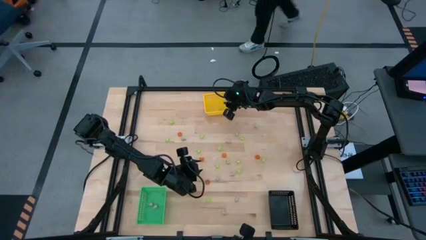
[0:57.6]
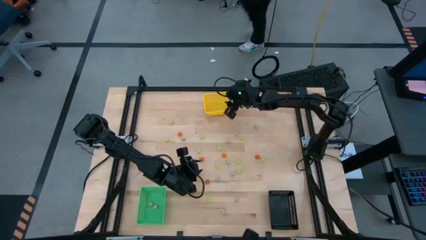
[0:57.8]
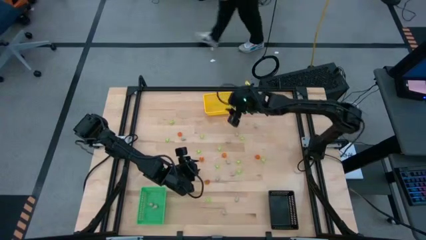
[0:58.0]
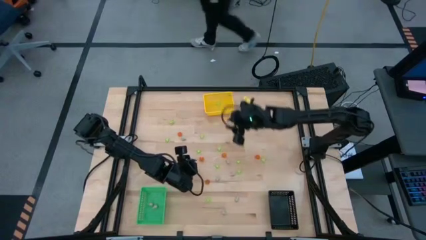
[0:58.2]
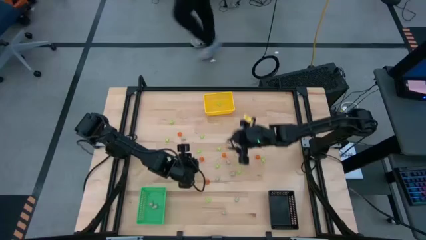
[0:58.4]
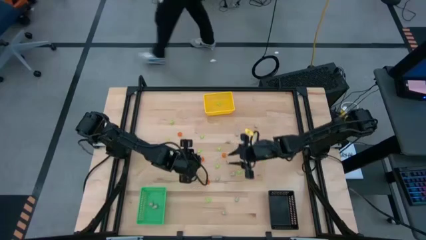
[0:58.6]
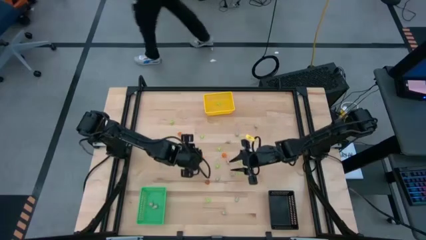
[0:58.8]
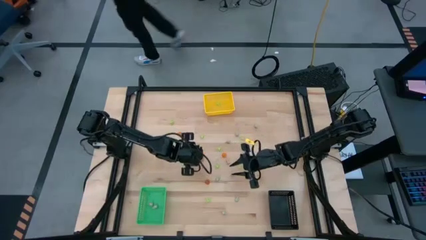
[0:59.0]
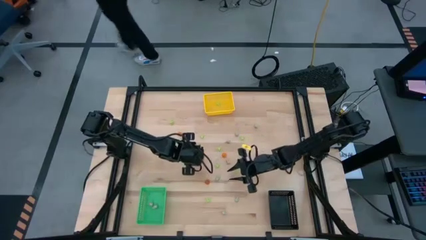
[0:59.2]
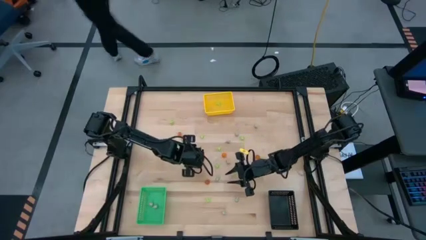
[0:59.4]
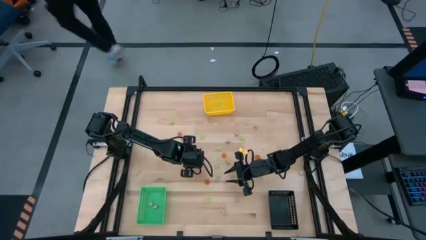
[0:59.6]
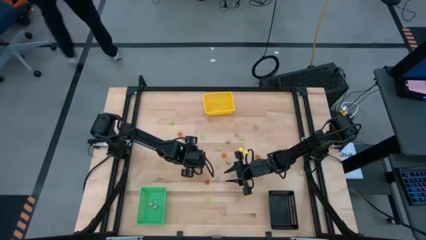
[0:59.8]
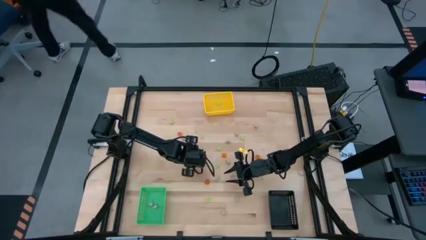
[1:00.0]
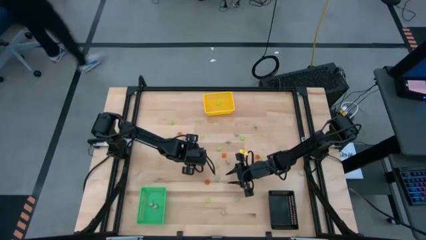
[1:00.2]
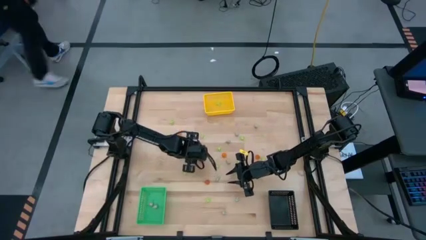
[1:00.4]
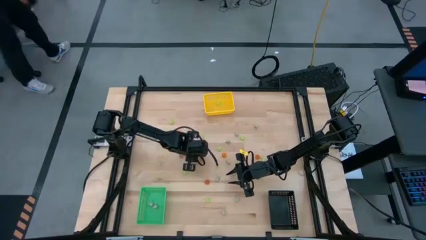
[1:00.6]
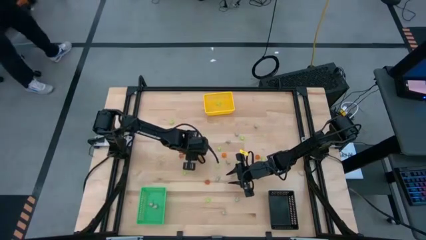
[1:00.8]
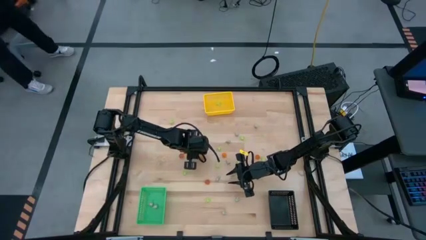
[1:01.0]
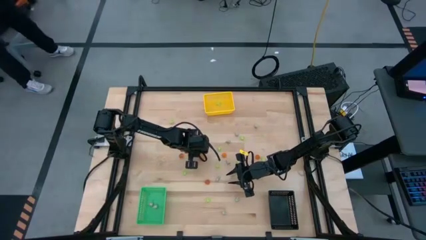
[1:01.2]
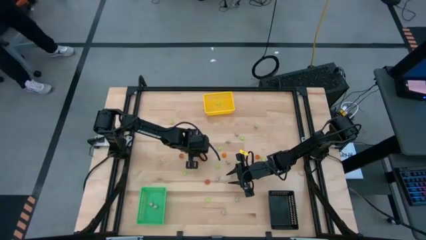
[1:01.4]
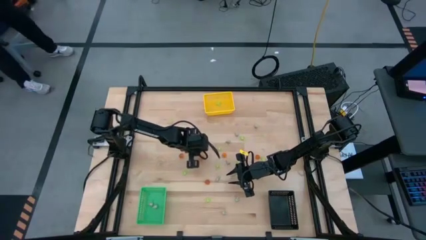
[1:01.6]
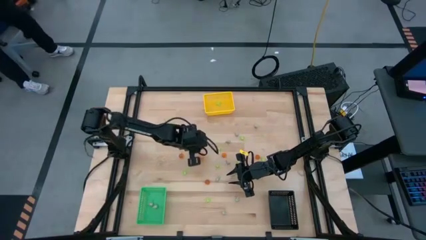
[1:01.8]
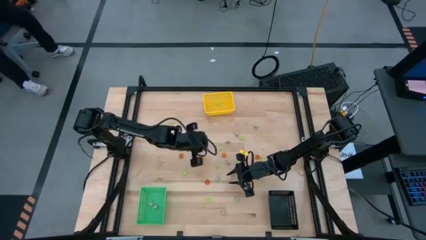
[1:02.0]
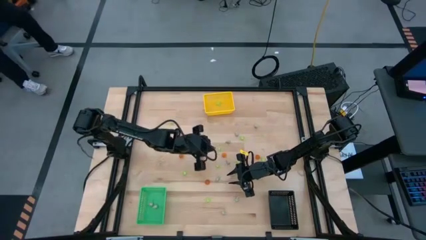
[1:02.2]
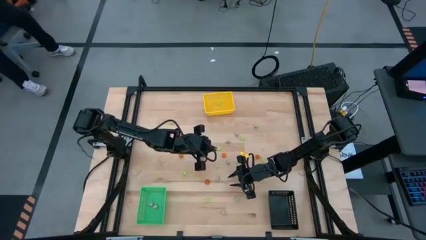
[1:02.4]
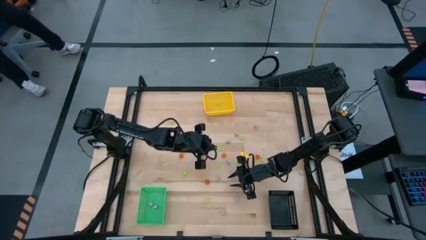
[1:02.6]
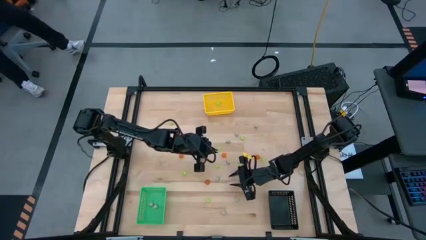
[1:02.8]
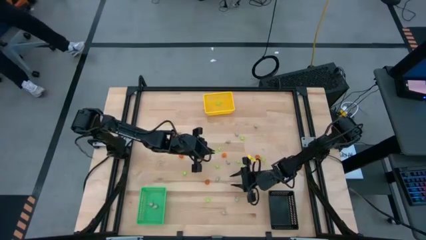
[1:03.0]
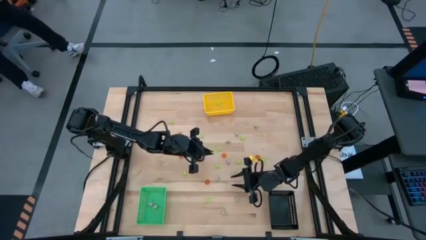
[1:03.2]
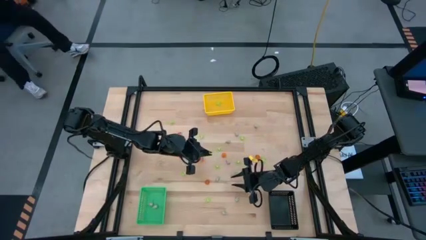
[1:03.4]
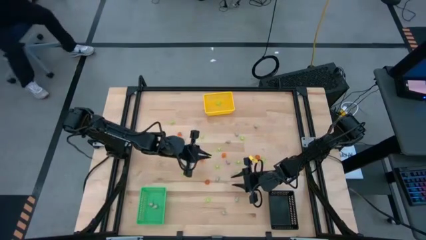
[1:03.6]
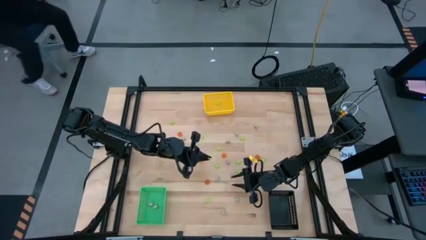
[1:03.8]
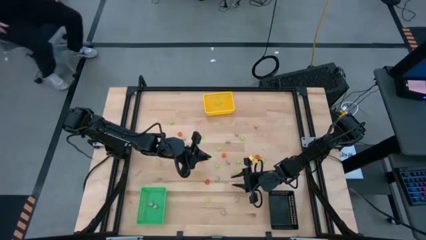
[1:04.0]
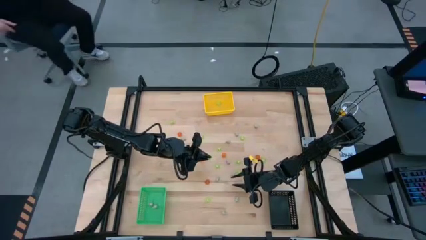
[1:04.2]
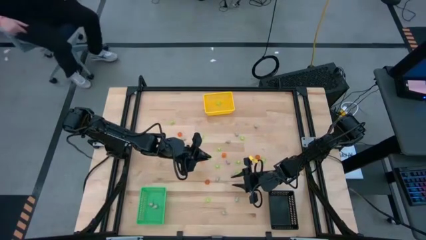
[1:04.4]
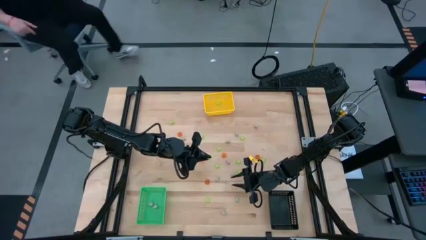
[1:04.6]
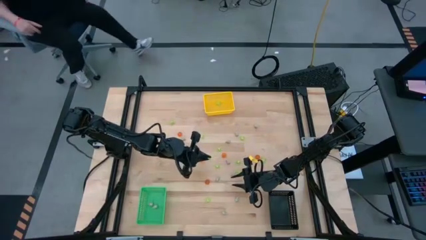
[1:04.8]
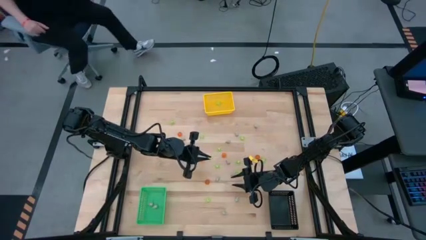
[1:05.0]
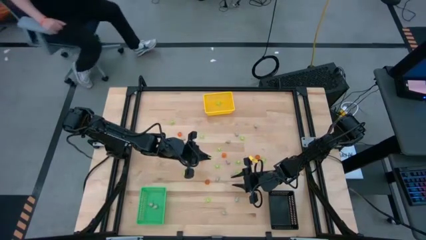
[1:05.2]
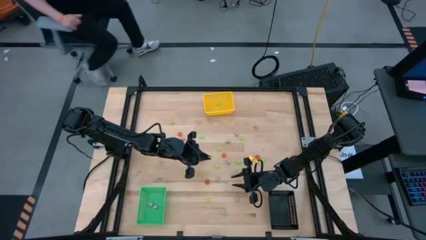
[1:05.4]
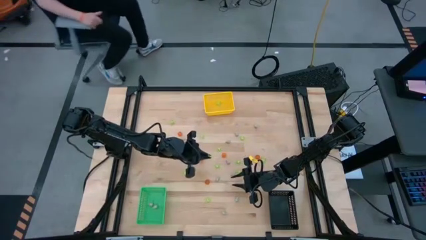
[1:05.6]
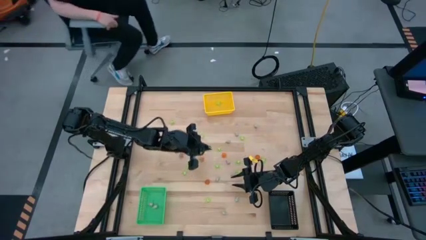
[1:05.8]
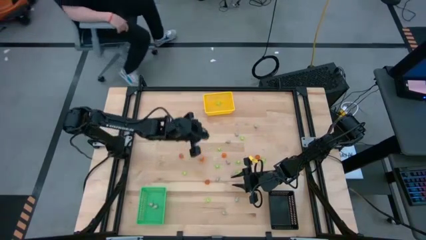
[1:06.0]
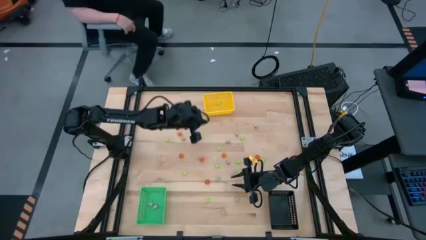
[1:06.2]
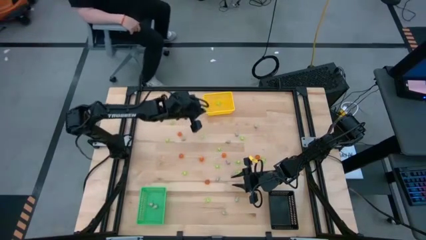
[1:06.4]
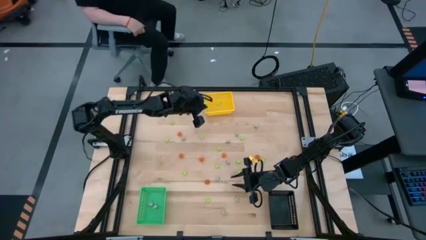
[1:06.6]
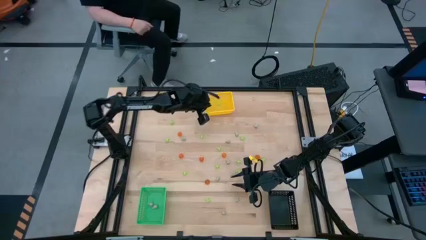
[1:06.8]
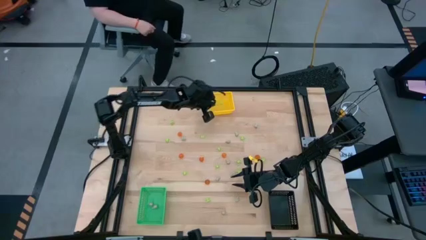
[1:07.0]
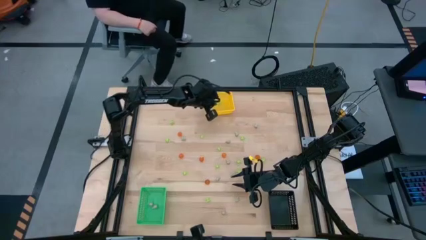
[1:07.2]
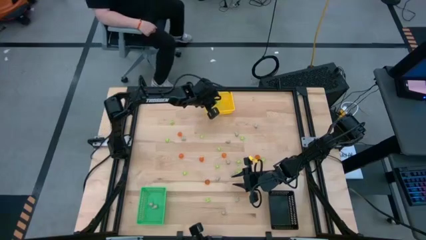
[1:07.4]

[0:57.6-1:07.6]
Task: Sort Halloween decoration
Put the green spider toy into the yellow bin
